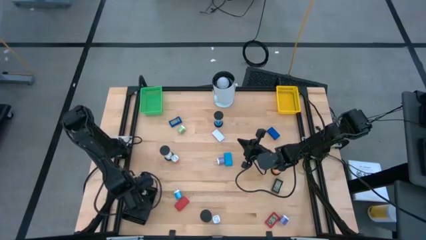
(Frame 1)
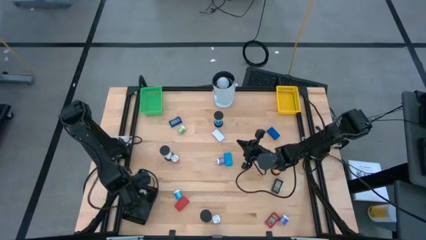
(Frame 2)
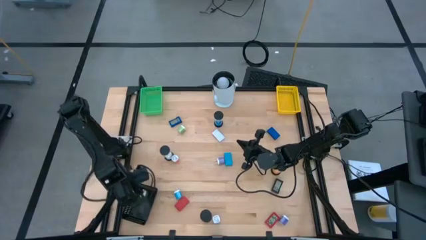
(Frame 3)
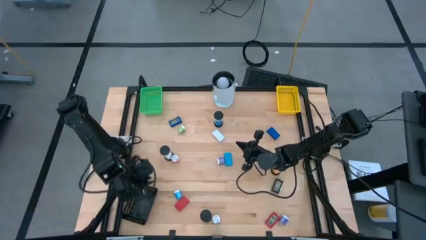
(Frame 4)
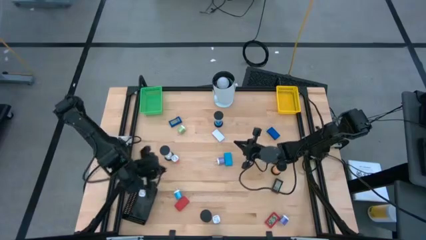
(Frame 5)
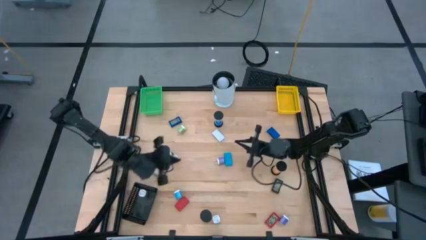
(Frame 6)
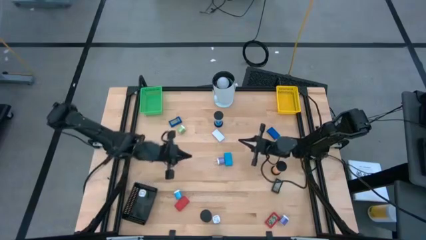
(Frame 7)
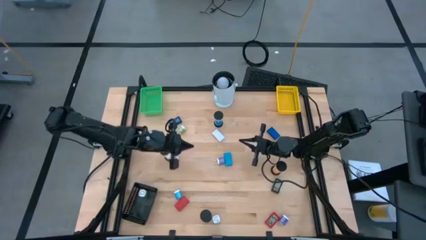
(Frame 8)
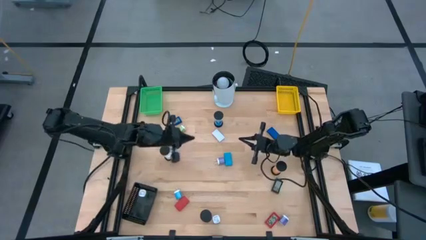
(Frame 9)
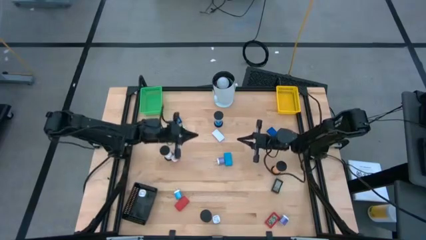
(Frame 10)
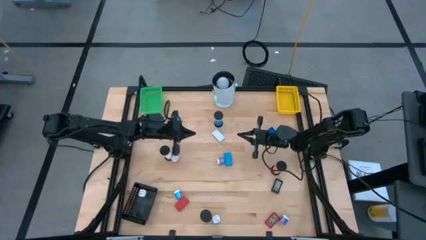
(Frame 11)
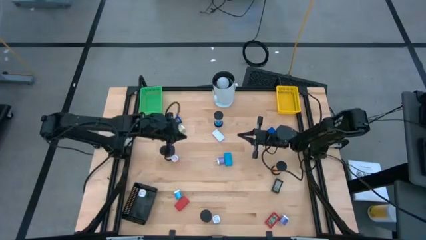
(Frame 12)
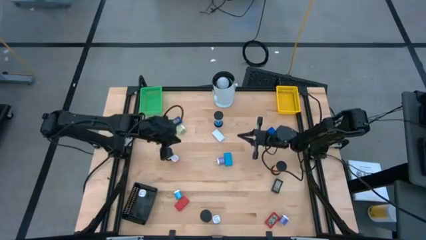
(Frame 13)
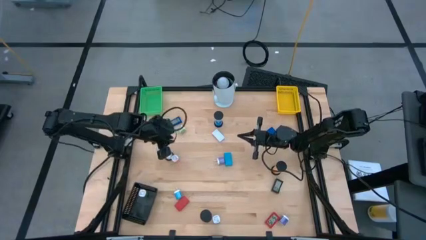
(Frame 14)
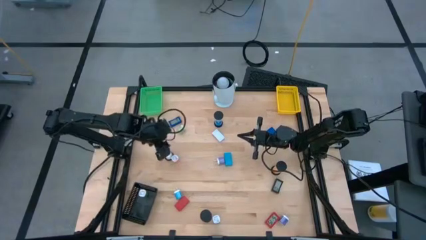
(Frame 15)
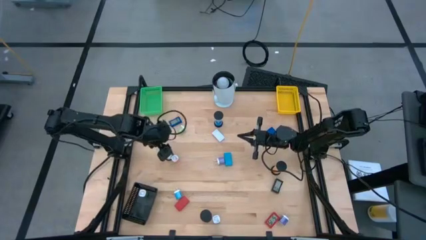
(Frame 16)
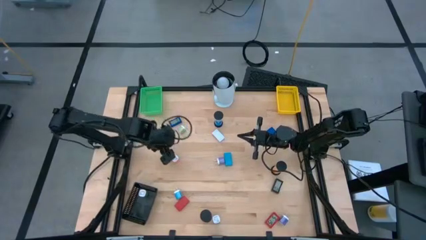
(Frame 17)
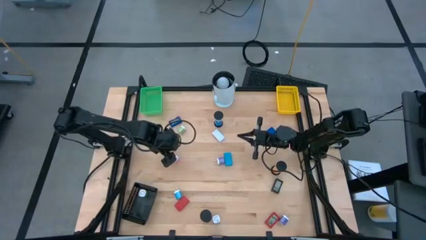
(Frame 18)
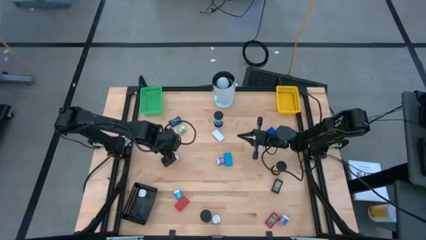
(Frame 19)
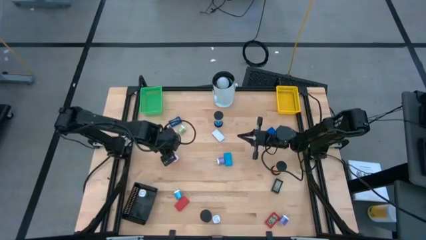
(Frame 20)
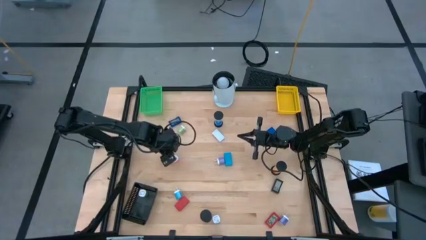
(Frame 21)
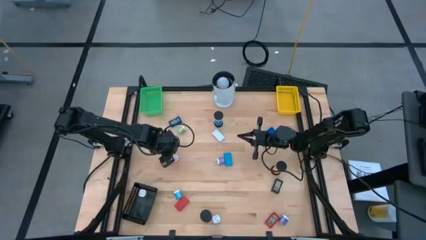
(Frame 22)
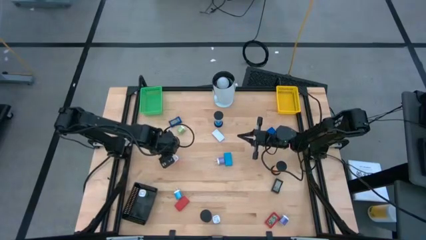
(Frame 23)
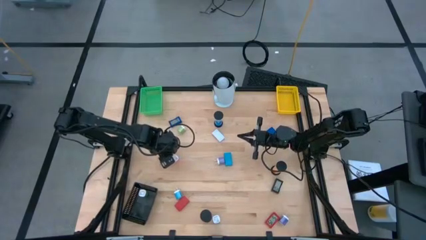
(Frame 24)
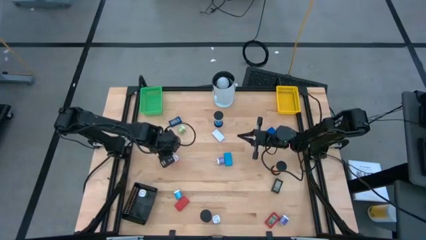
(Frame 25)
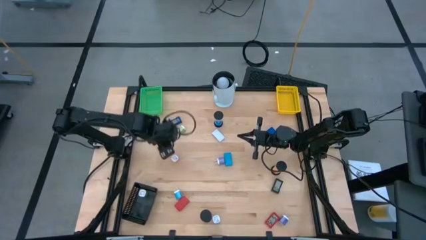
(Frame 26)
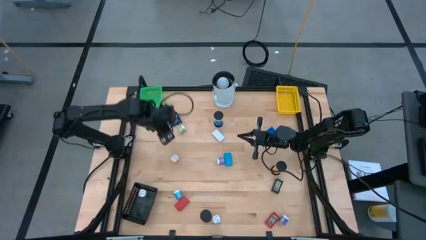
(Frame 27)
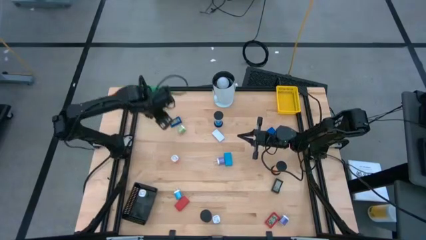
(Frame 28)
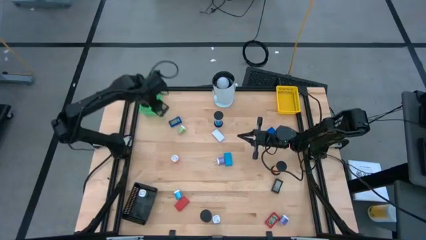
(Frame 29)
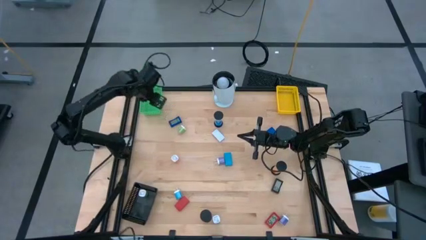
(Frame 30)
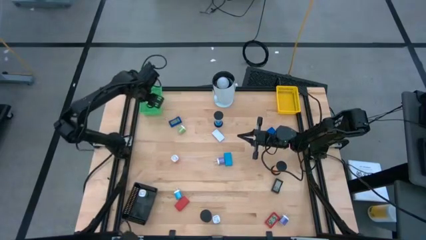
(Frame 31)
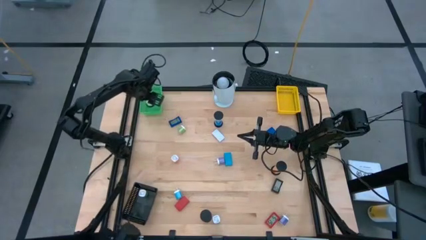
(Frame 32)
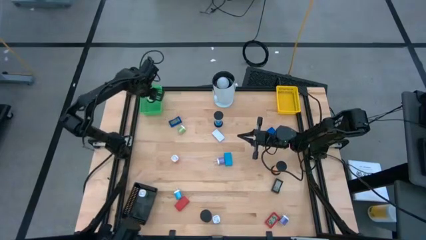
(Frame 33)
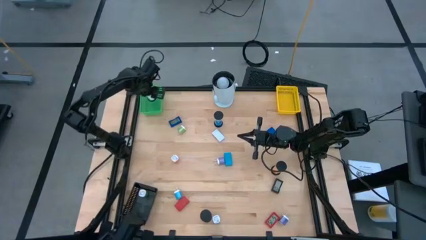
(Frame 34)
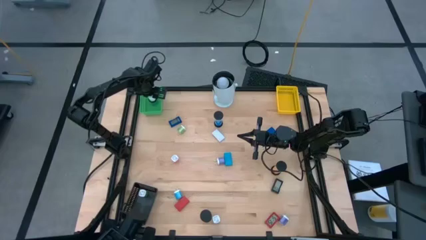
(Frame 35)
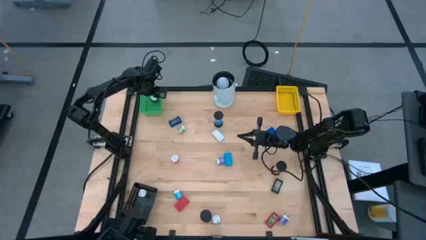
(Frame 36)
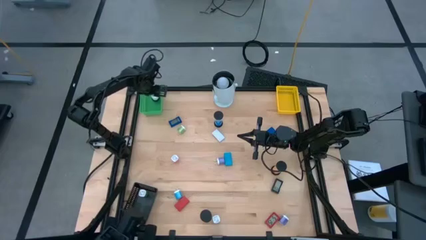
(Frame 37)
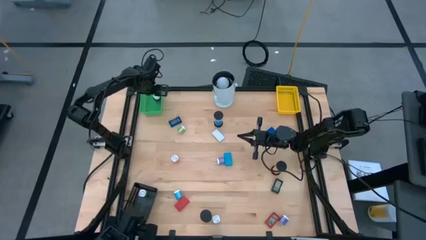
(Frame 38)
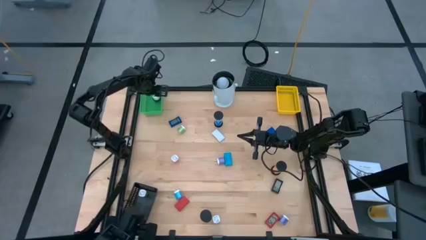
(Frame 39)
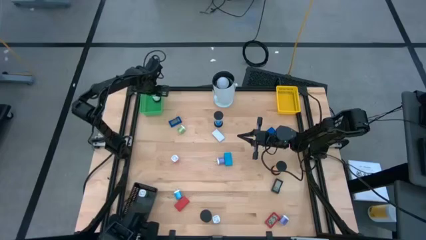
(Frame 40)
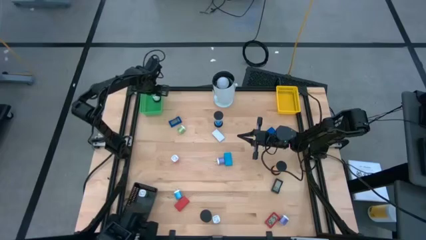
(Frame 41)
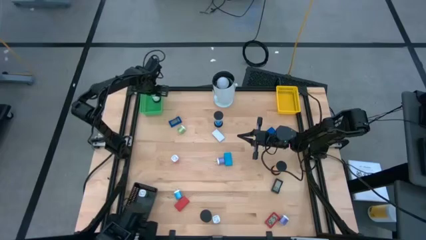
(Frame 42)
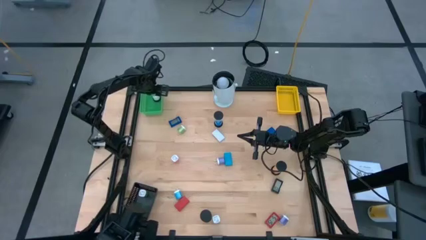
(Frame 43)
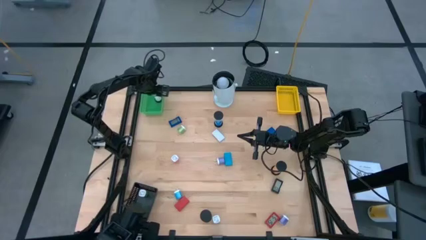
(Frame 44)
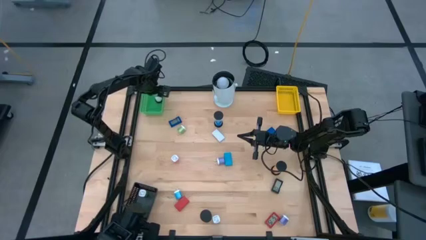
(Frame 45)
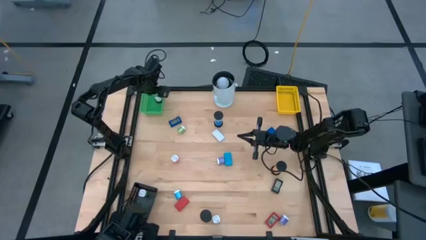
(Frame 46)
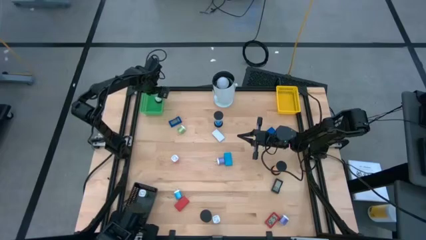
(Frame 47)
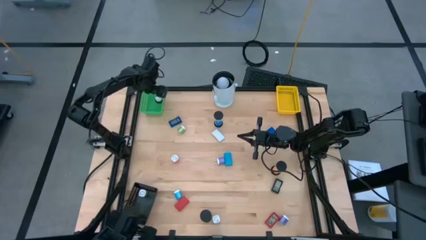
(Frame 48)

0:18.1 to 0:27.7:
Task: Pick & Place Office items
Put the white hourglass timer into the green bin

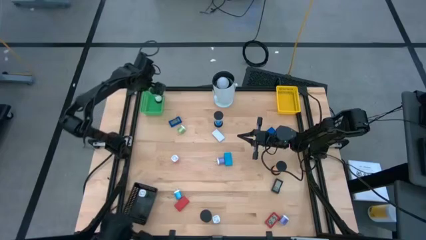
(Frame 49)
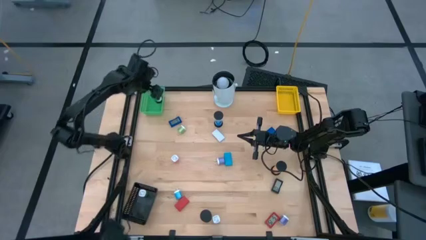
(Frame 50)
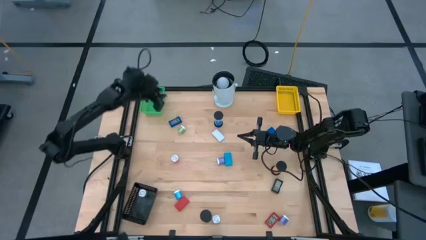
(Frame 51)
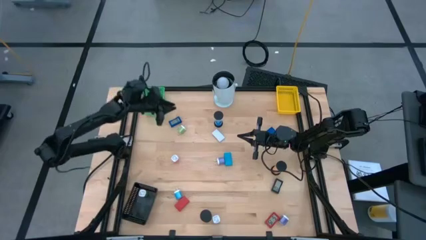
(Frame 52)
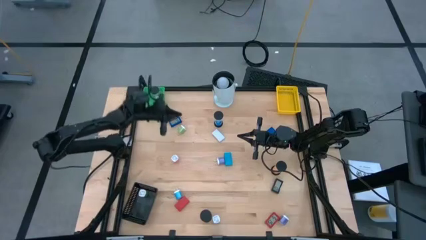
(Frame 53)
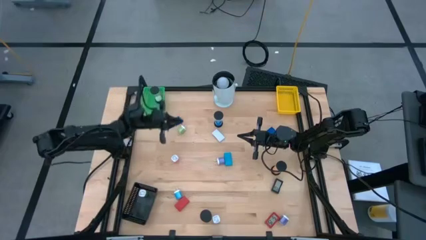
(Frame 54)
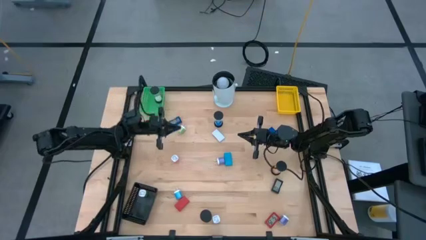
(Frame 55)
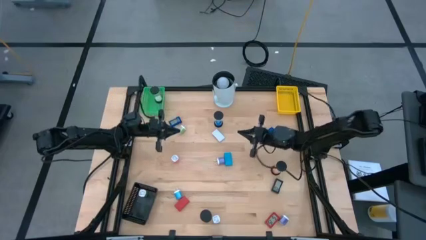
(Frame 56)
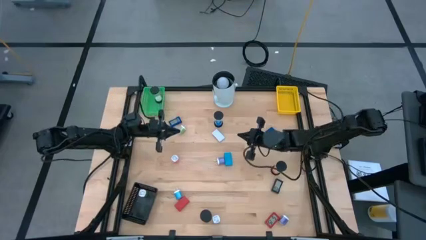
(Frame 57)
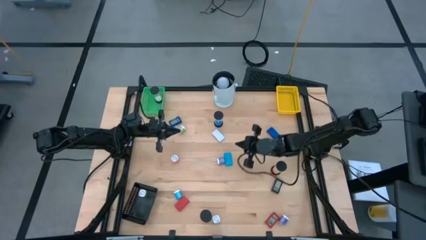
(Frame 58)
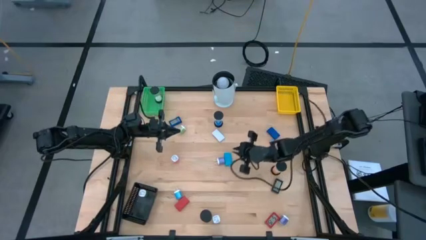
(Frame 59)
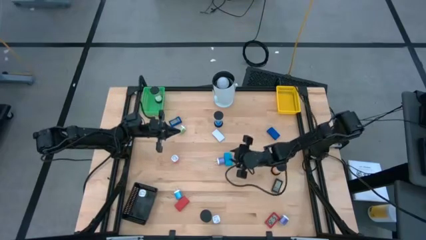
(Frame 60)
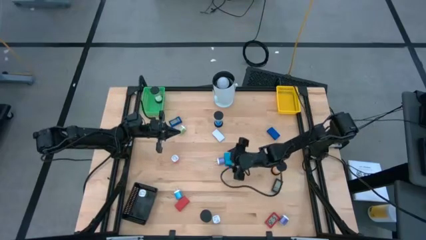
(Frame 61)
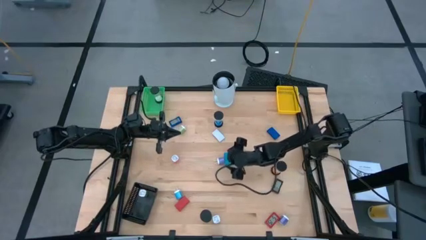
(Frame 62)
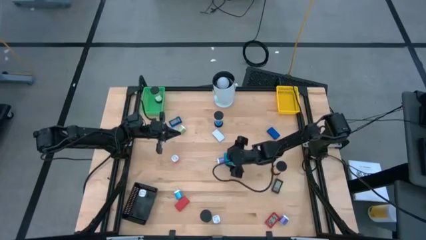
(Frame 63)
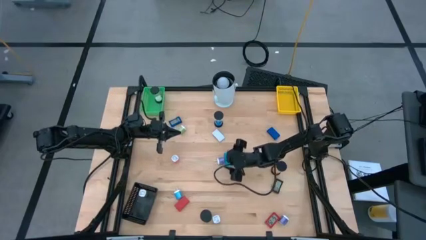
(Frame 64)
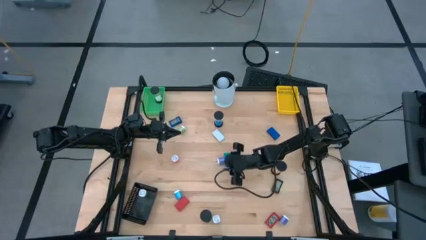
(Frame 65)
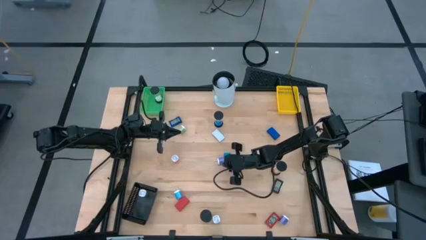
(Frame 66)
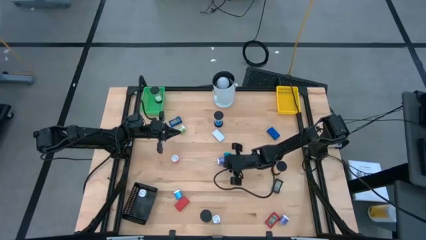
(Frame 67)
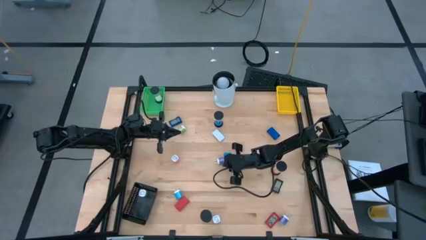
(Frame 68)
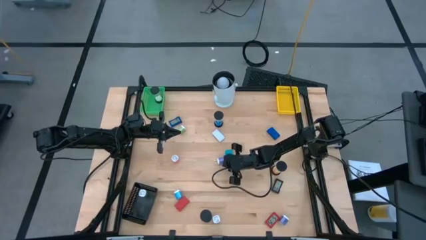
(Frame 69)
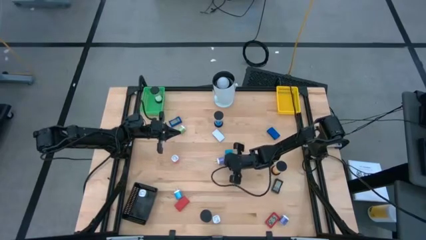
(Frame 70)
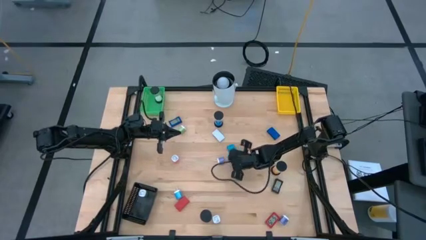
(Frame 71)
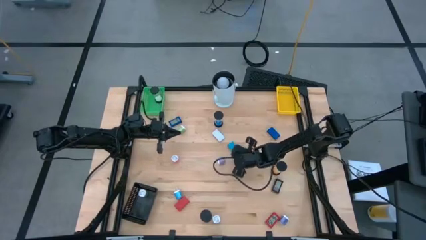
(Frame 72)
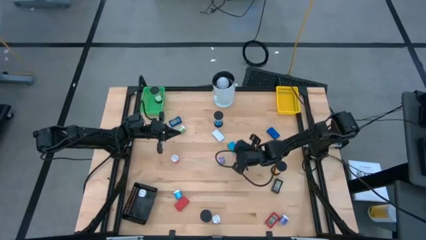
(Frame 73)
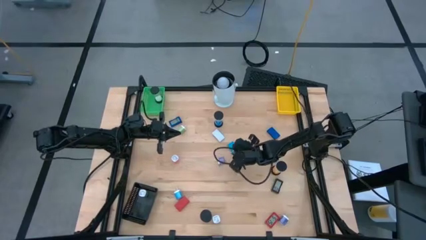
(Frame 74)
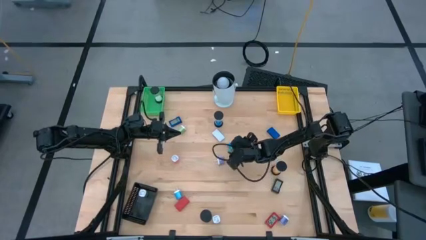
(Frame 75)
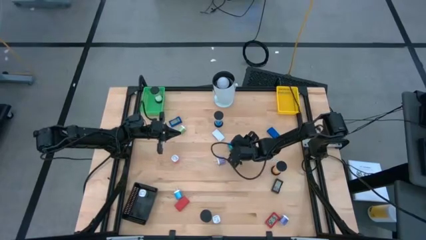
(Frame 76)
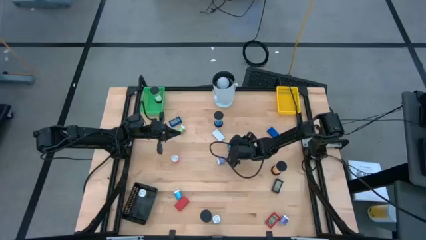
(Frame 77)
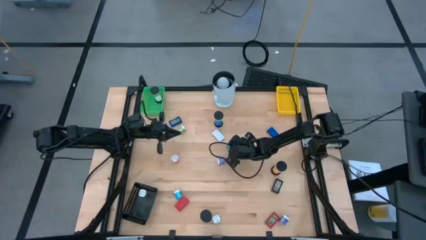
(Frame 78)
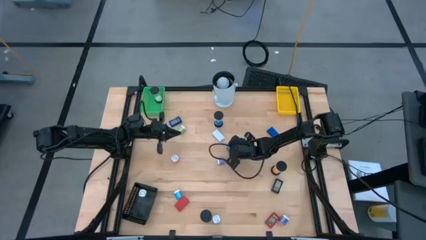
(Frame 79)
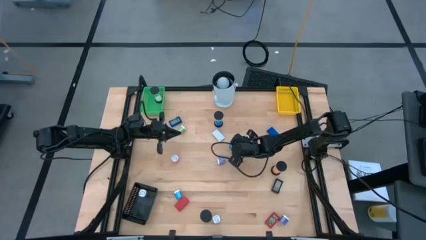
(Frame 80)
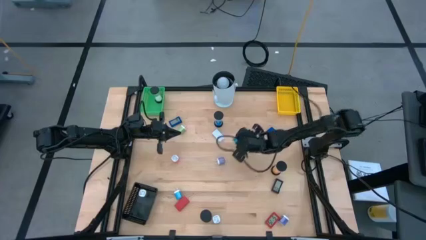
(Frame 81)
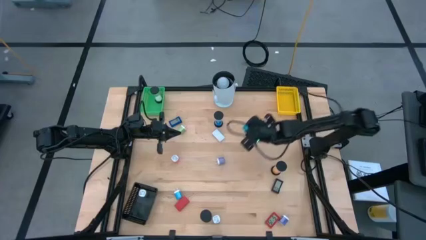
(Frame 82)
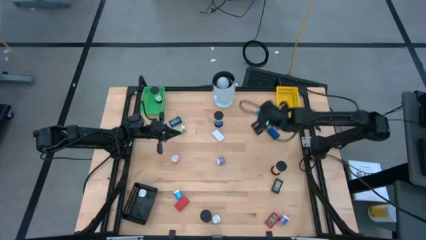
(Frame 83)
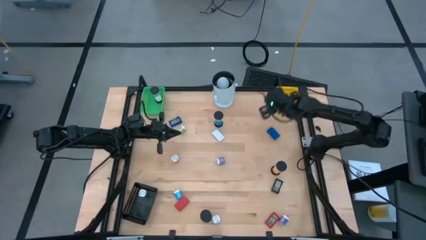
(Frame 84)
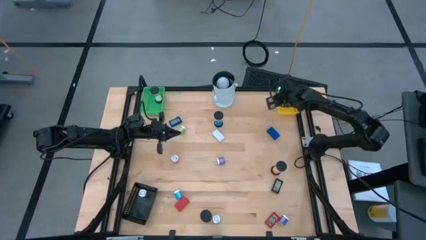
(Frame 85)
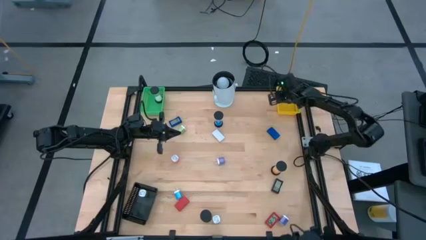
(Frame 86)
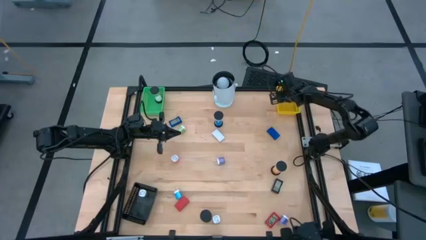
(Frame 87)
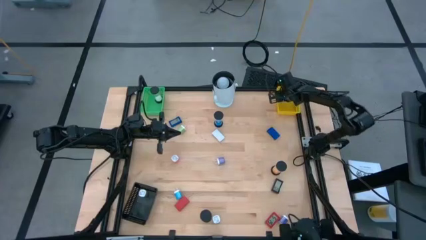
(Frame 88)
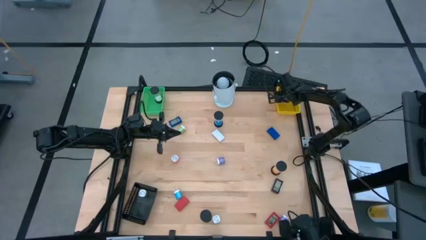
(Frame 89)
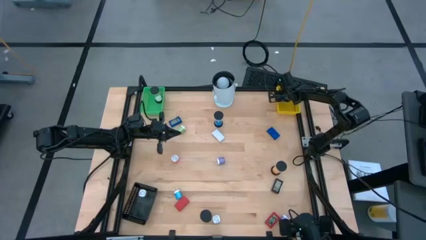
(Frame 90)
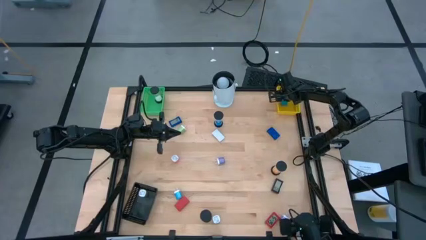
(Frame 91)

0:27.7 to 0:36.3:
Put the light blue digital clock into the yellow bin
